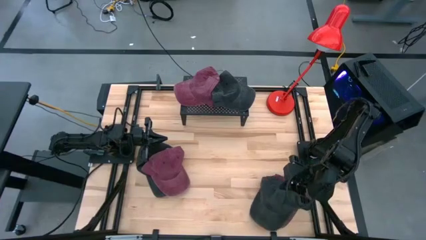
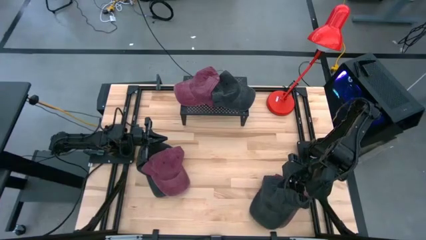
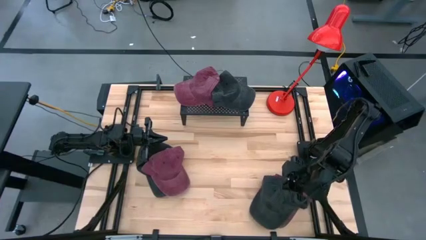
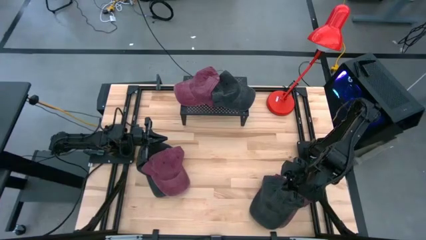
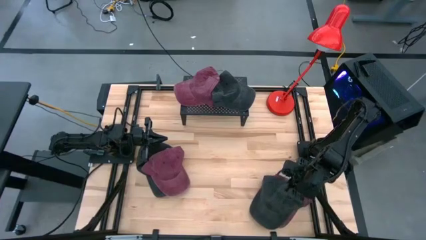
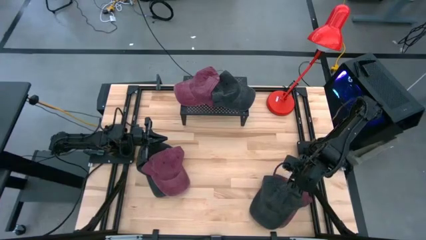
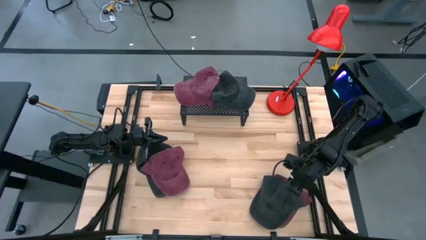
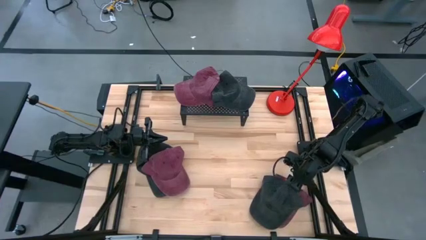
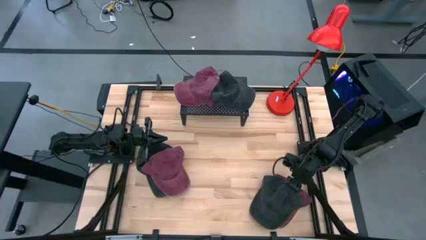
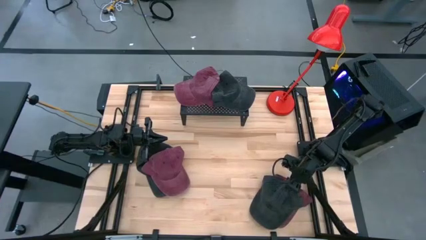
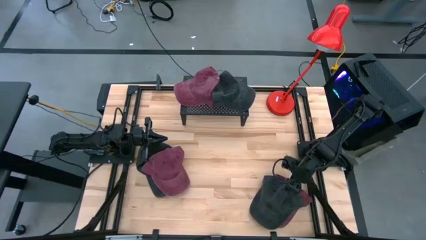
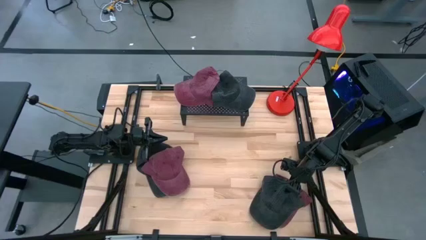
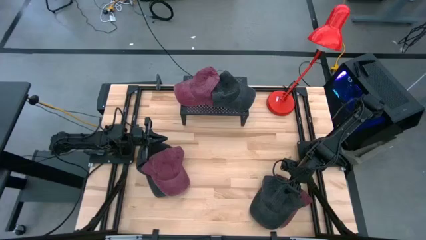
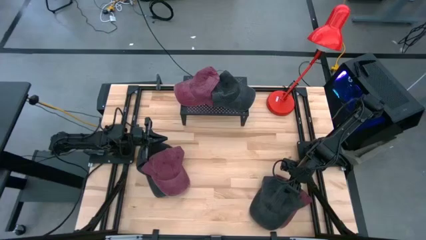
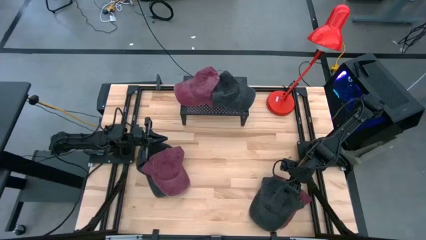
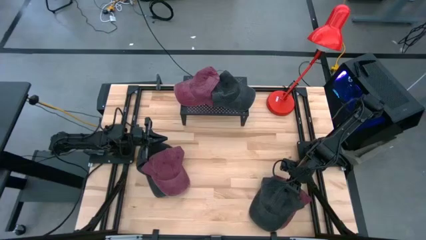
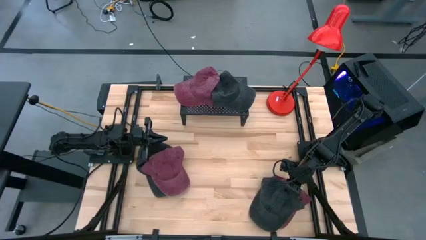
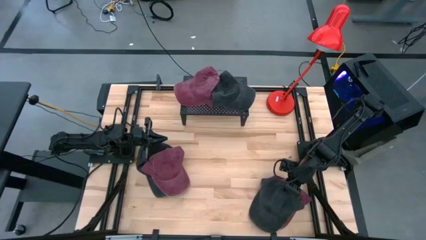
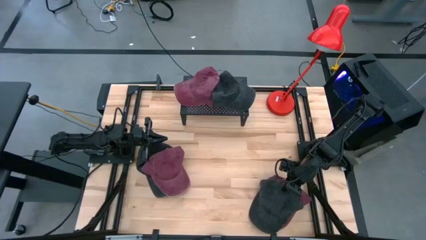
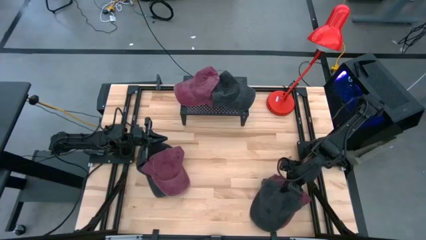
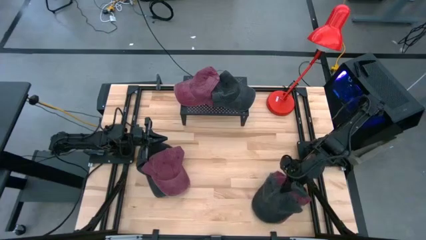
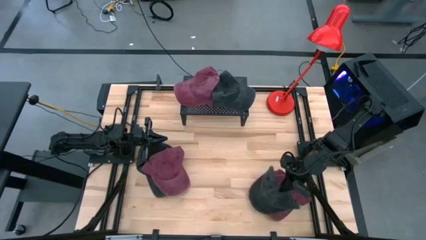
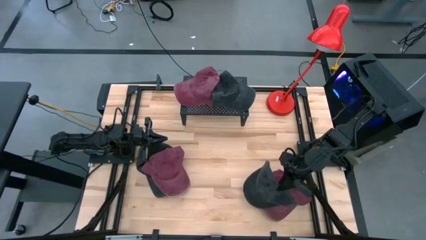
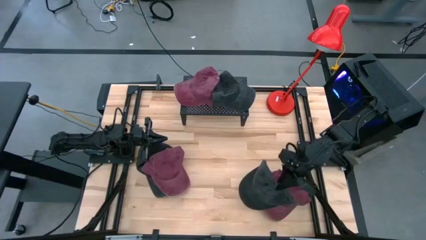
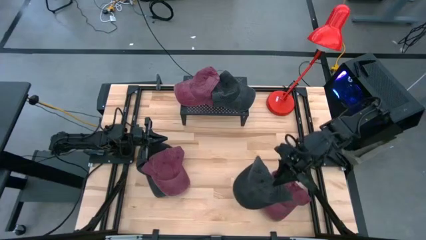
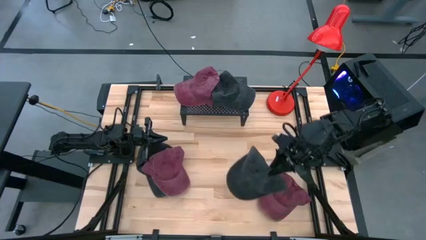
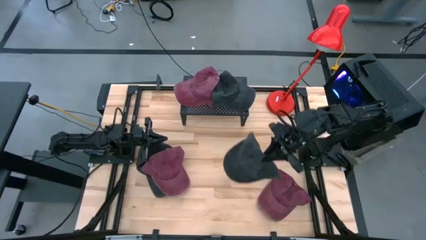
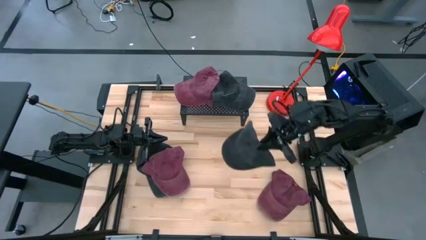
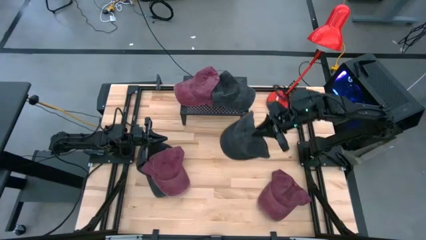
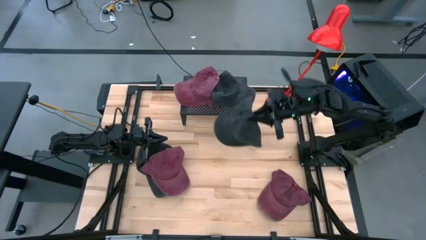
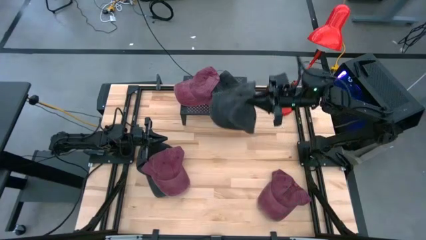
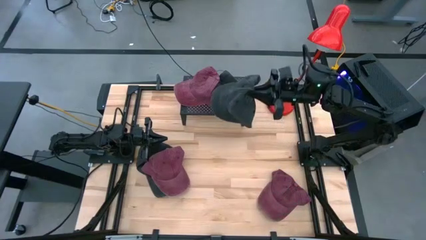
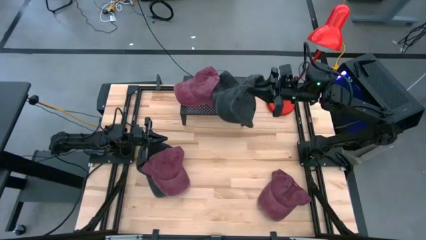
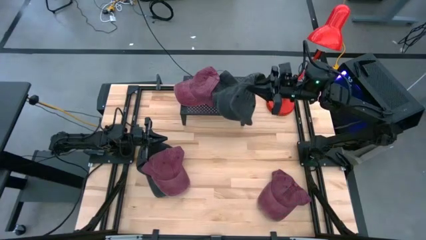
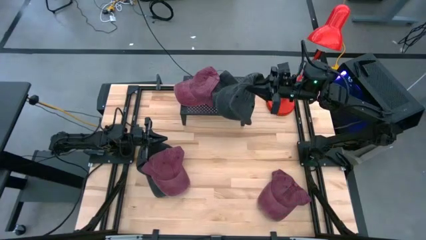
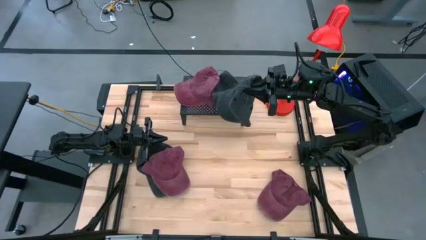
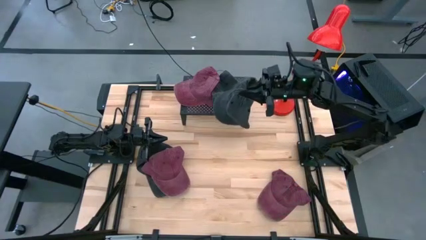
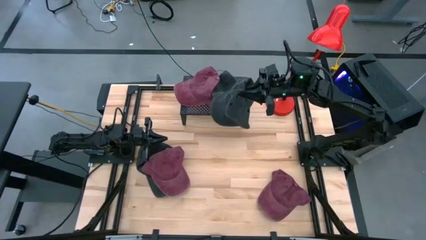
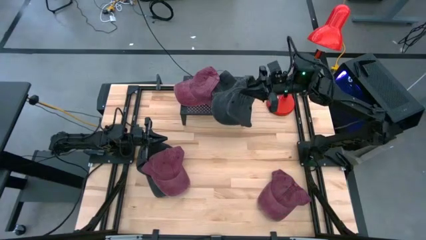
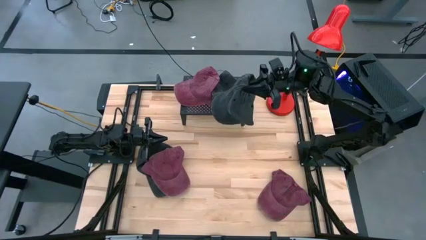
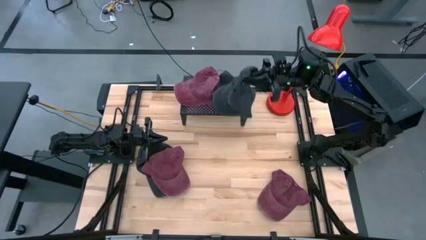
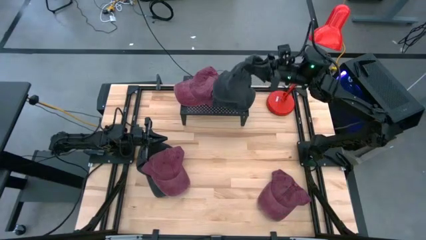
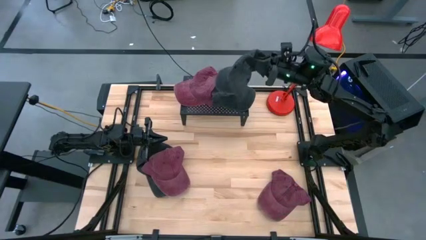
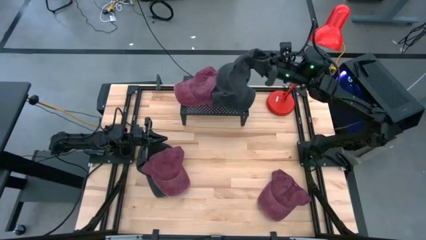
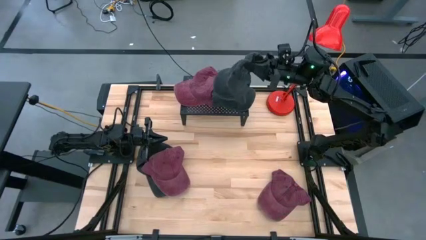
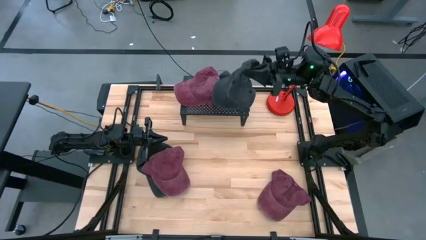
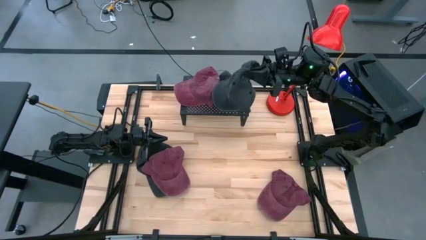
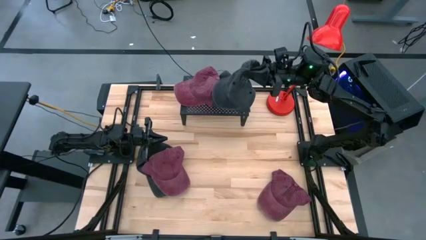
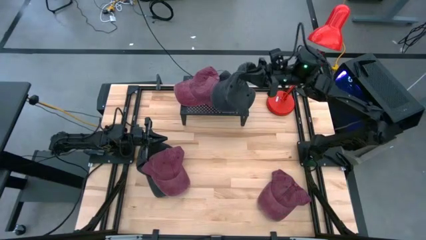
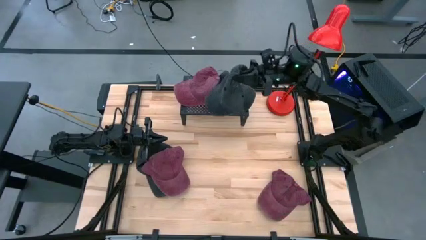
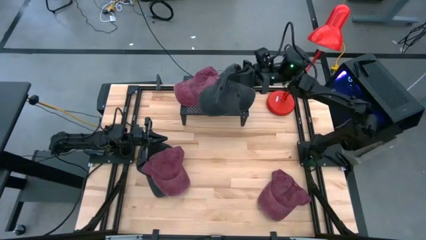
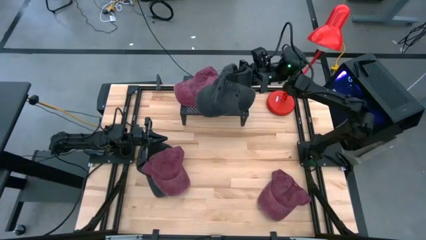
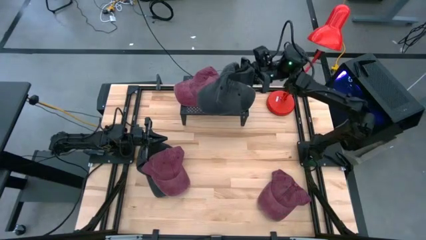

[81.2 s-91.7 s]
Task: Pick & Place hat
Move the right black cap

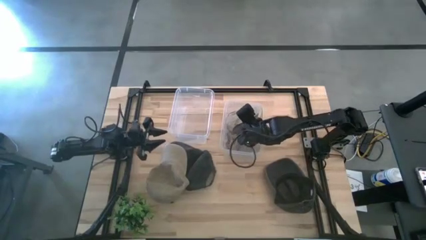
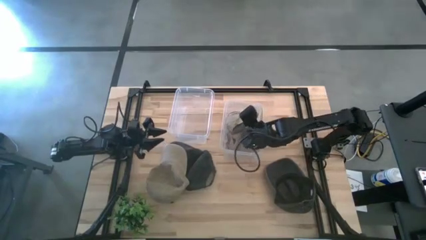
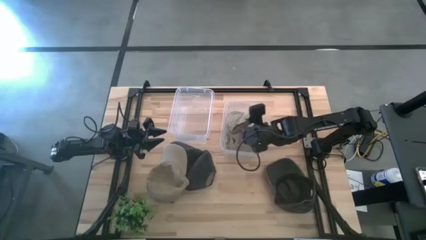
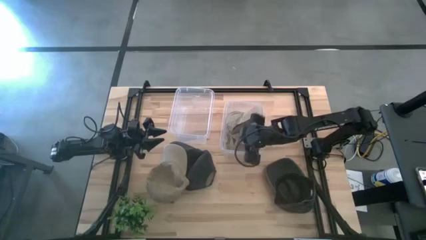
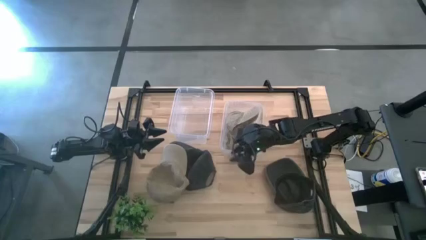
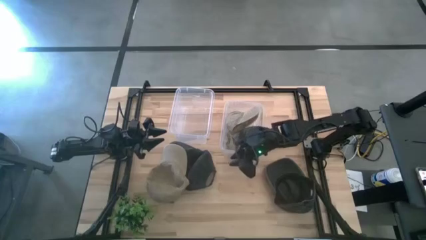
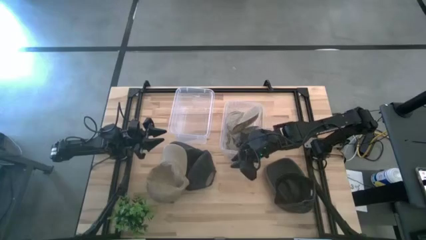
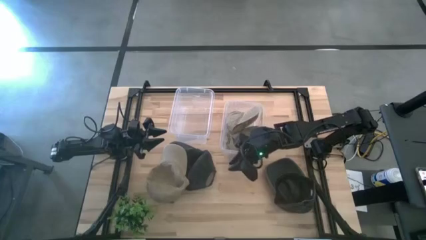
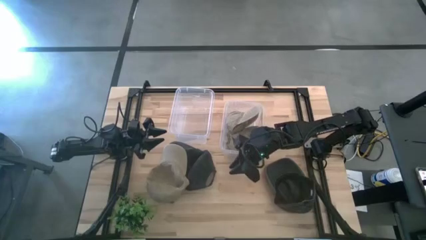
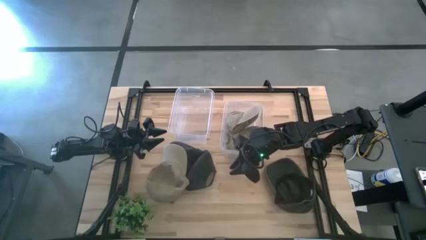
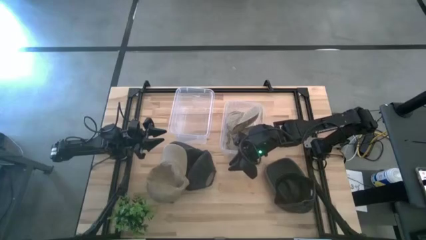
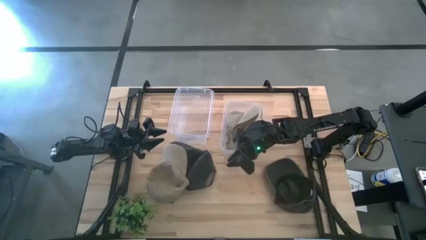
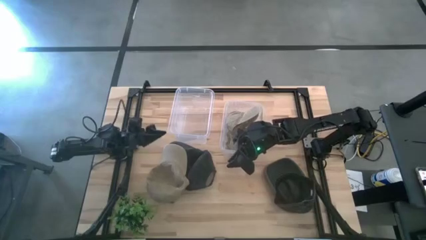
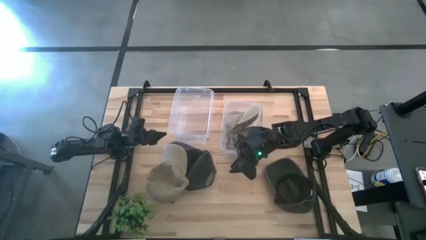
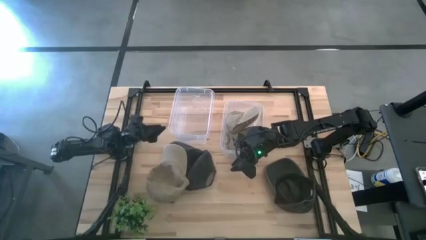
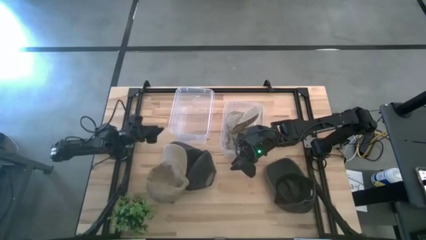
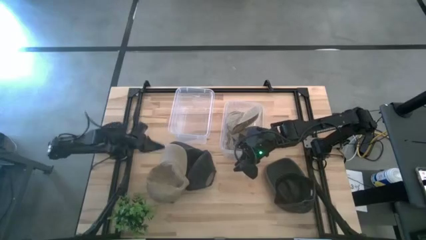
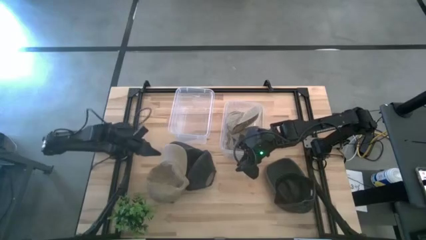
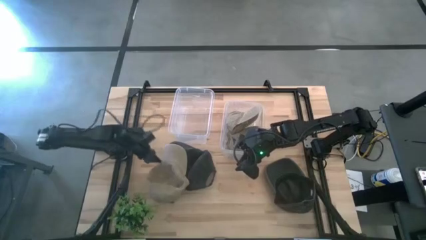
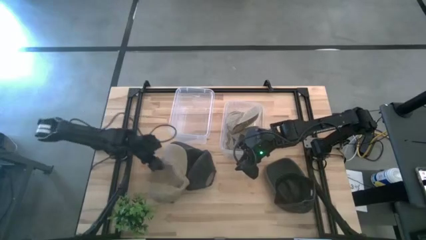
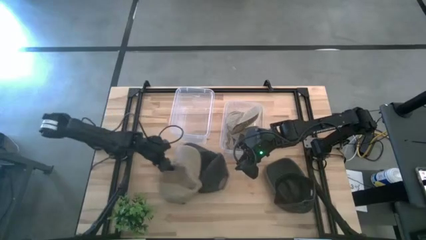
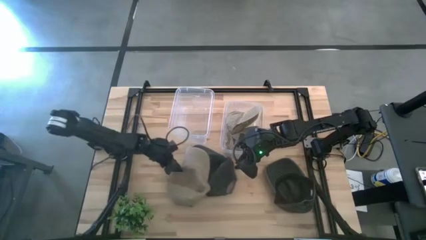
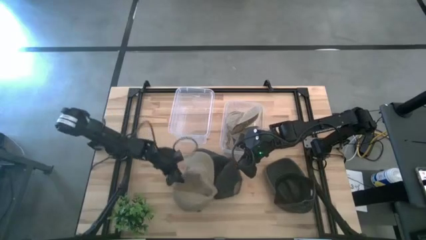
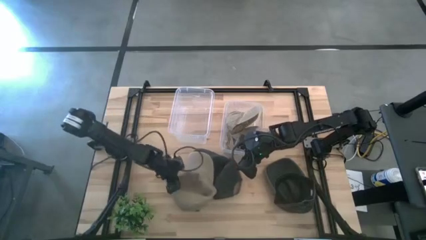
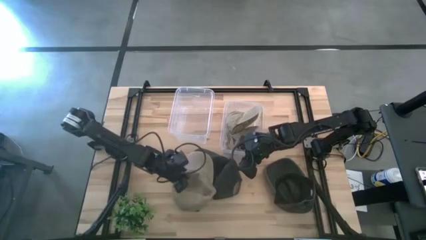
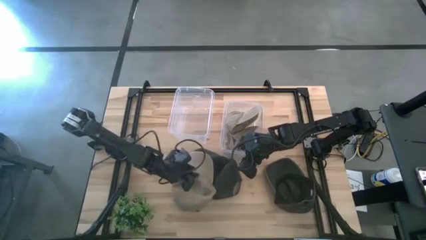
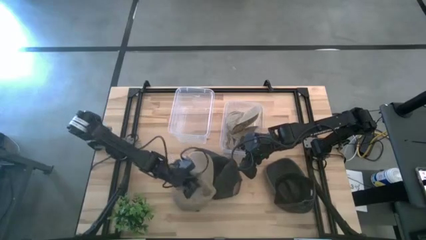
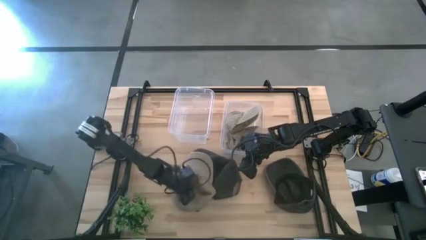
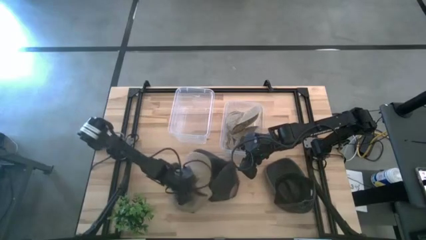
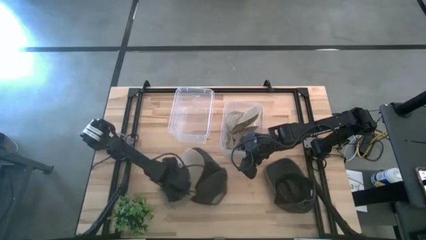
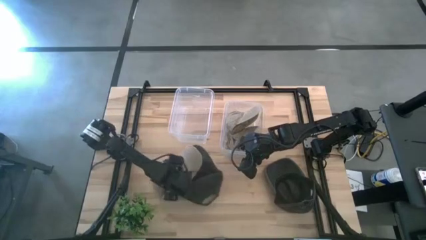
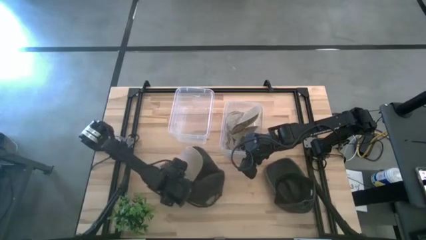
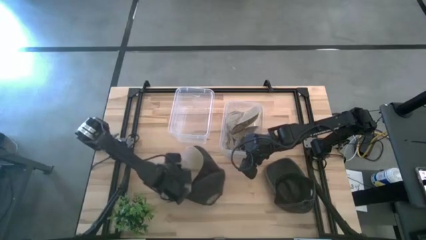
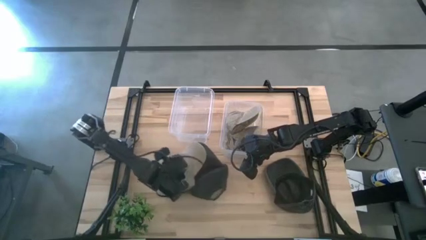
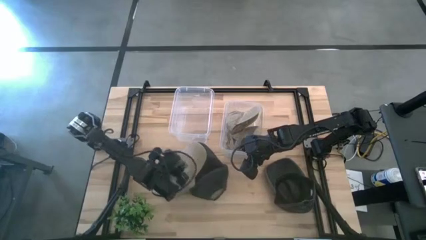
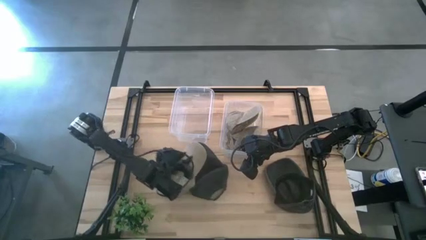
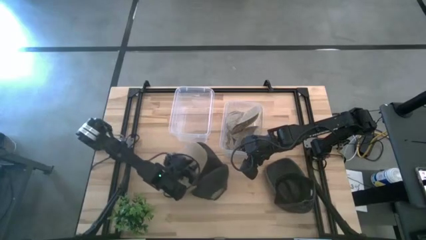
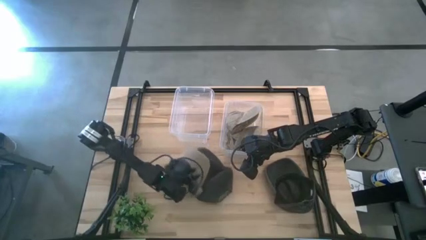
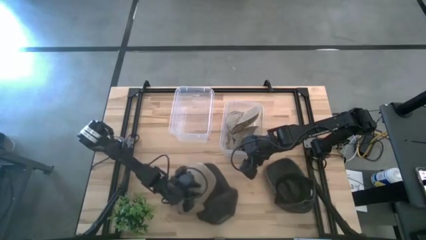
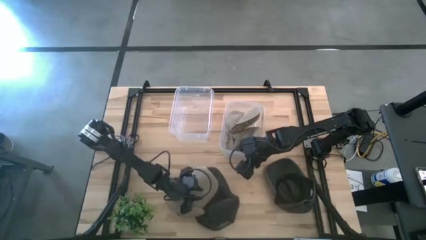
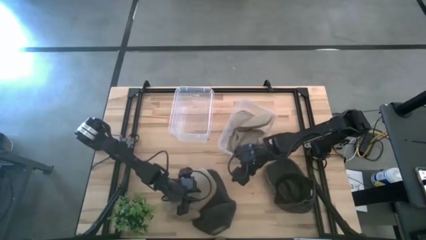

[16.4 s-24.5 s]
Task: Pick & Place hat
Move the brown cap to the center of the table
